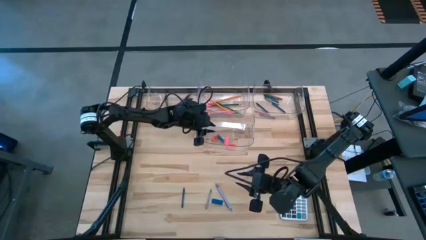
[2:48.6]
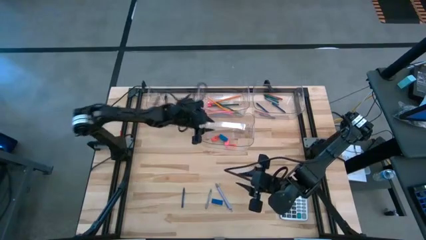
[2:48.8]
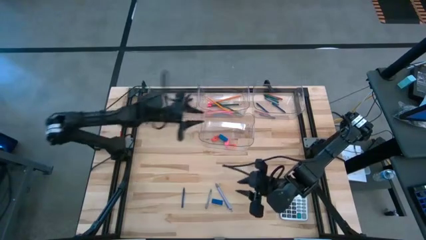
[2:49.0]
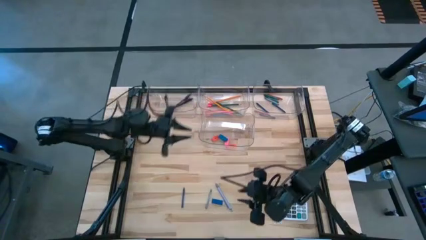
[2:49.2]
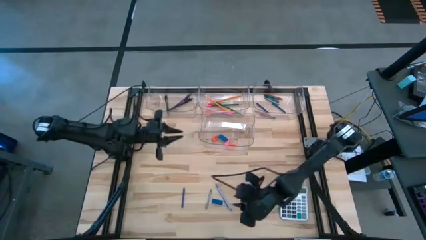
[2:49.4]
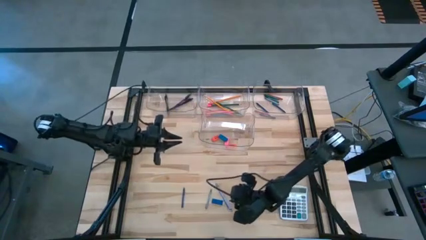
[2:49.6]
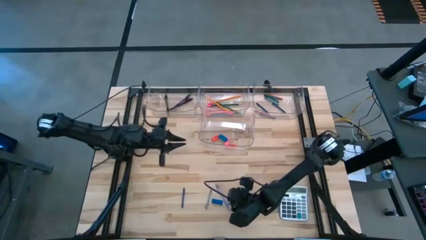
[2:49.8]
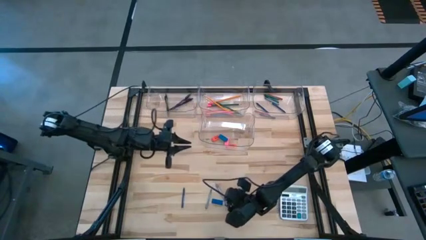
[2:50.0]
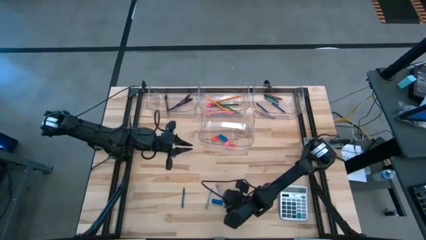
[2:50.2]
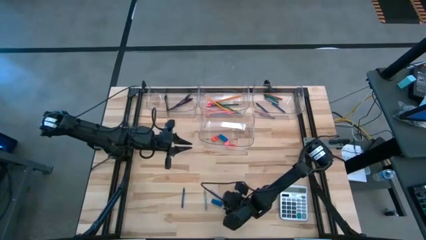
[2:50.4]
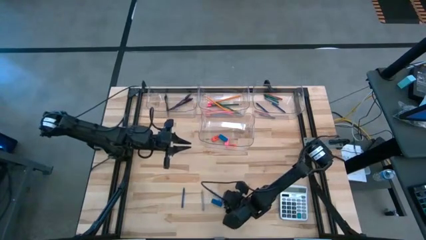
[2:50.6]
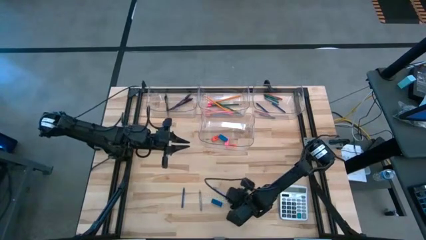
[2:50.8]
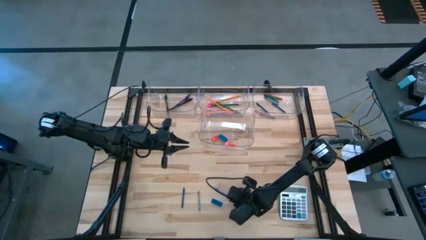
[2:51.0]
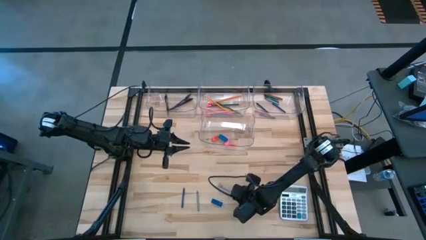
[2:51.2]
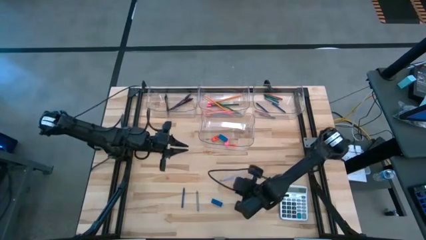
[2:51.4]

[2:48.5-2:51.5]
Task: Sort crayons/erasers/pens/pencils in bins
Put the gray pen into the top left transparent bin

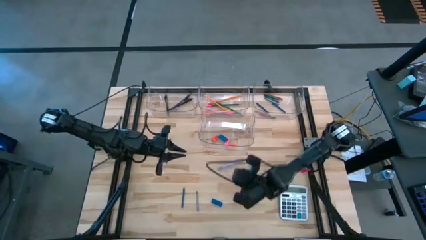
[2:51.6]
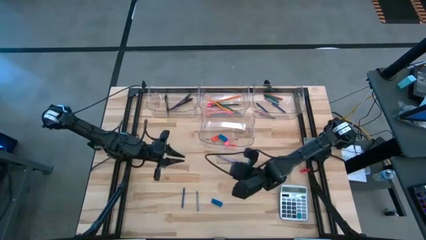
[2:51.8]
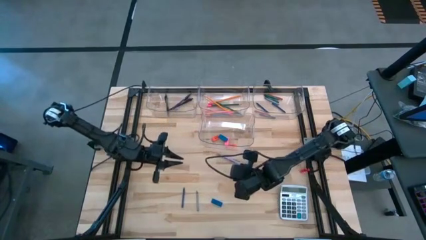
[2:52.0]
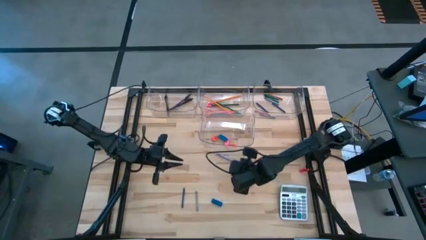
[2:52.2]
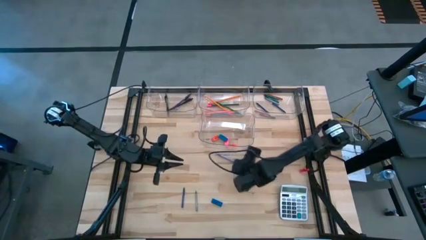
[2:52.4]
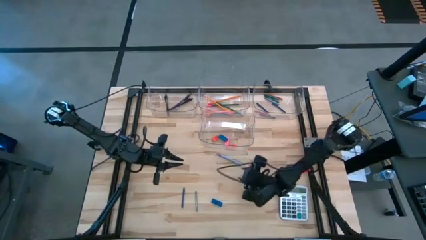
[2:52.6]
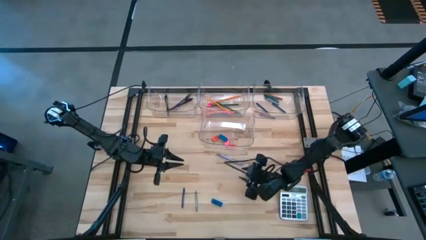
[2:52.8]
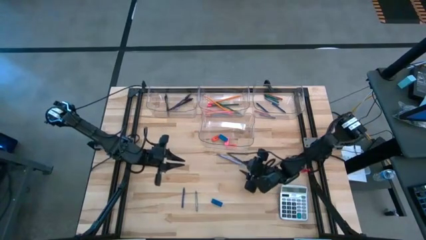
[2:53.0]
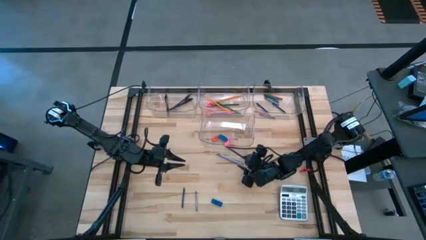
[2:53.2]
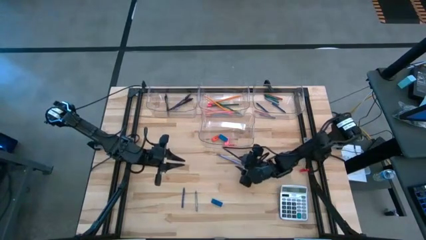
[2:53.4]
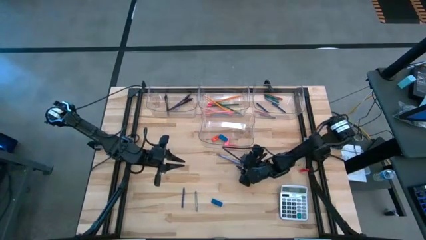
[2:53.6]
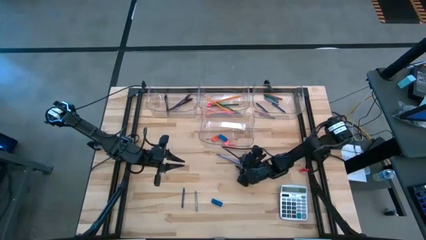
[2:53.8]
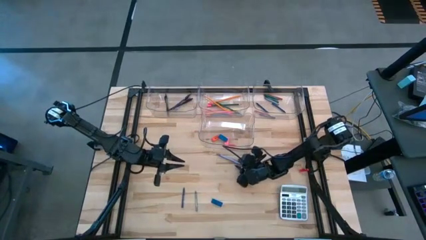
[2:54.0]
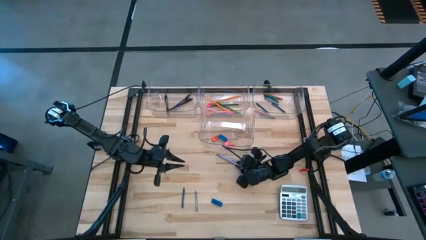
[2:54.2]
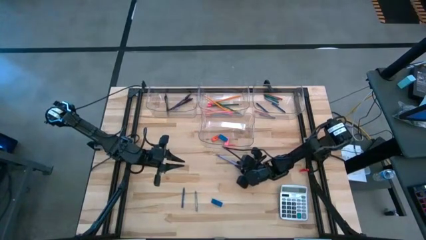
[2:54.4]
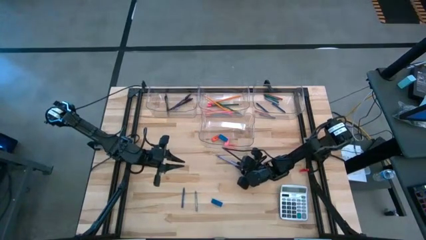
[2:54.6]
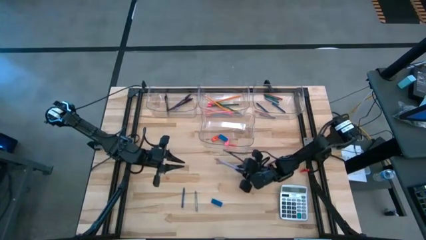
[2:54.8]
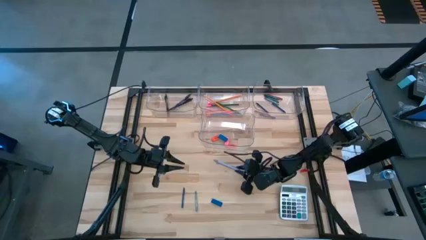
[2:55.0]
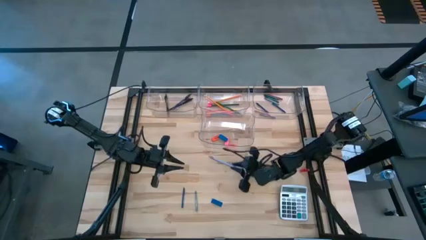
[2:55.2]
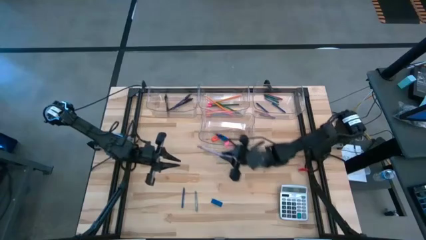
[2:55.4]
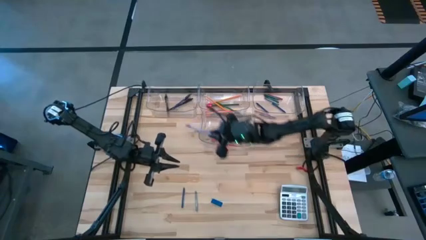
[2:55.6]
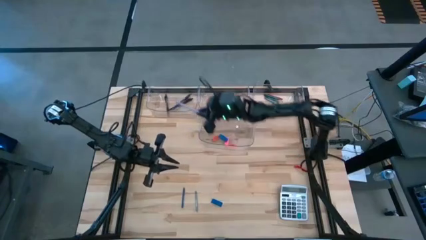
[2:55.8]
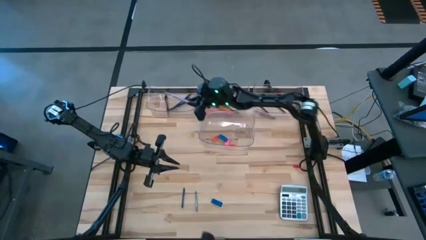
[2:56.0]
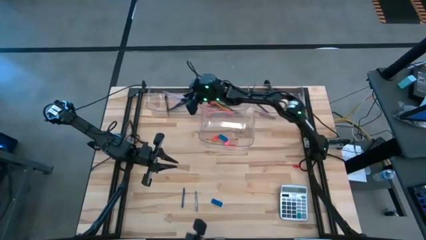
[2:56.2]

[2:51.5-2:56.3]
Put the gray pen into the top left transparent bin

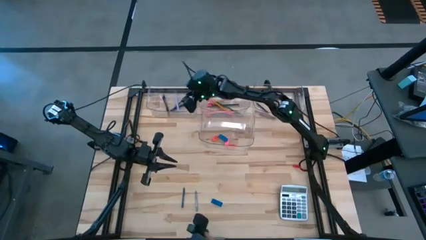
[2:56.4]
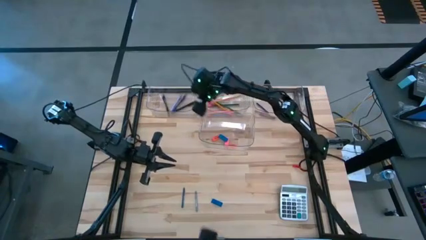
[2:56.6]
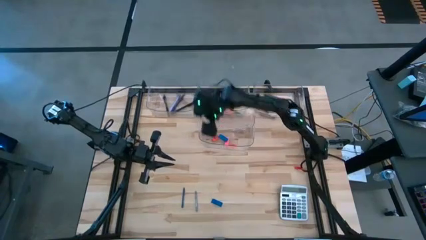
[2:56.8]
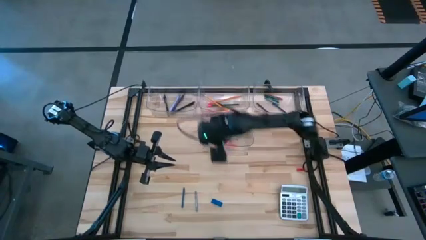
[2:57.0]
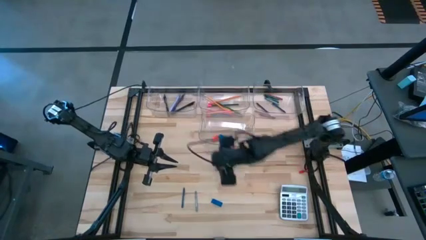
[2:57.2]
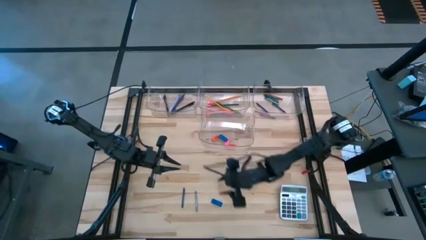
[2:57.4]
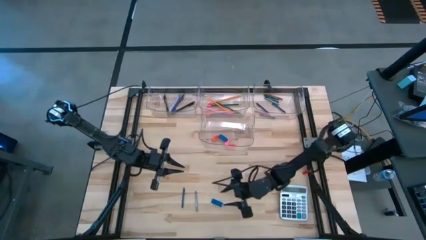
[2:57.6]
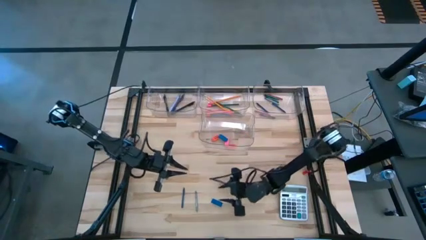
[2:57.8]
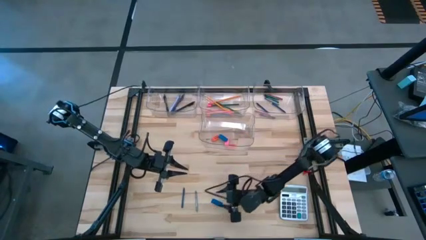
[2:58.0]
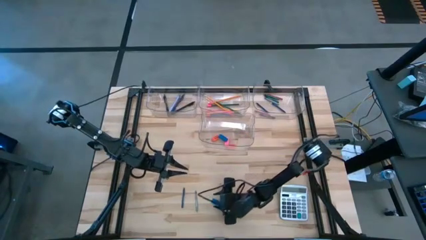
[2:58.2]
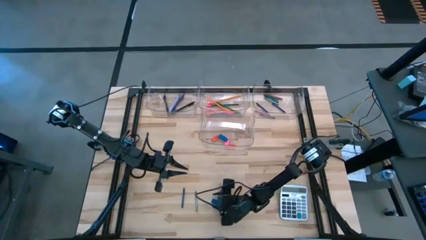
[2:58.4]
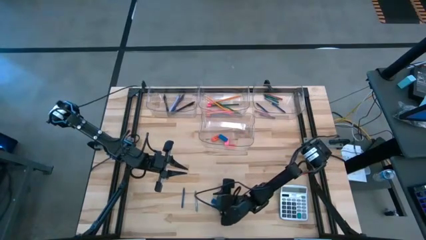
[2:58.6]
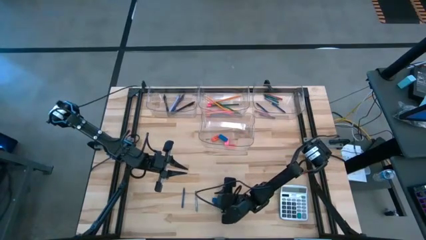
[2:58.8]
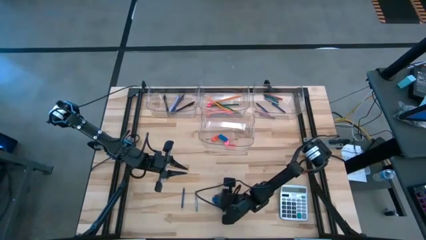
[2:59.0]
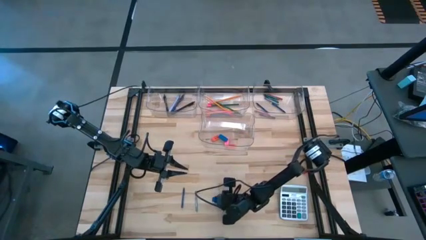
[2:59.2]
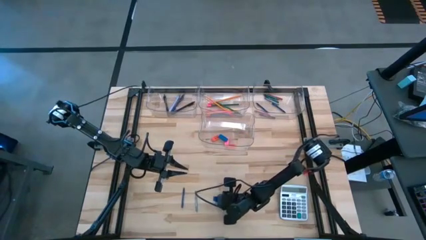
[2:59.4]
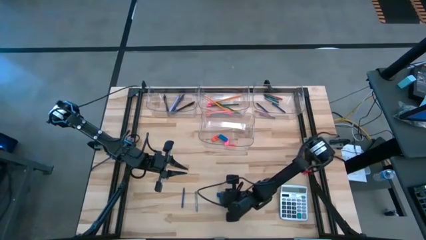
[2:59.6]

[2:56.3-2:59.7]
Put the blue eraser into the bottom transparent bin

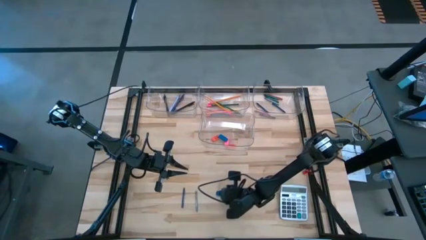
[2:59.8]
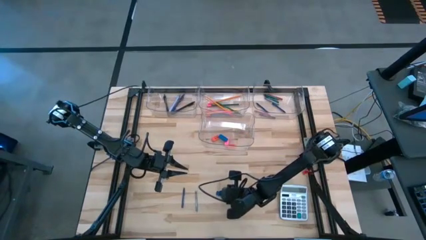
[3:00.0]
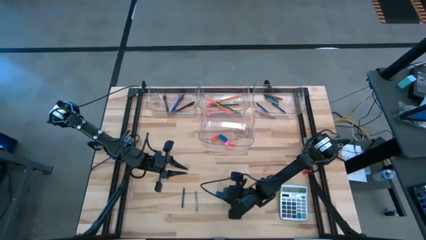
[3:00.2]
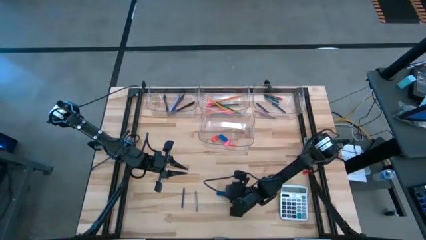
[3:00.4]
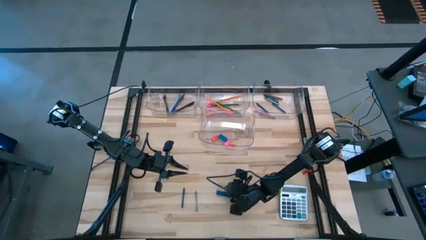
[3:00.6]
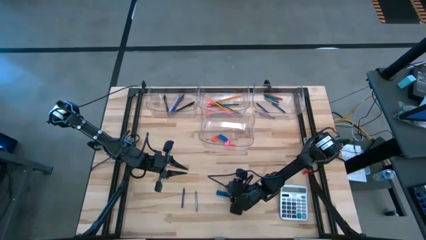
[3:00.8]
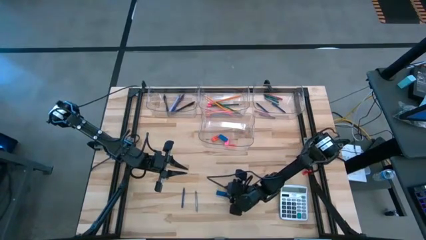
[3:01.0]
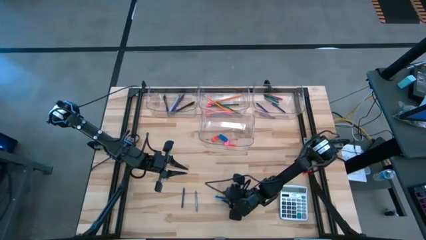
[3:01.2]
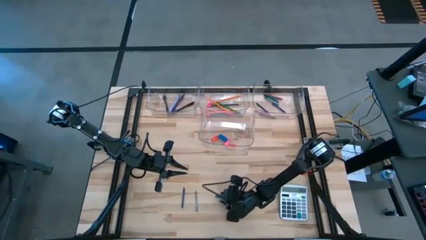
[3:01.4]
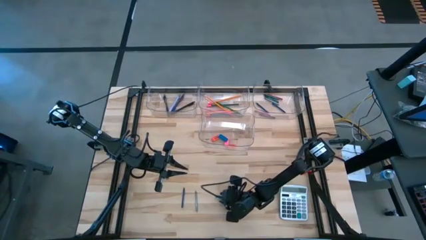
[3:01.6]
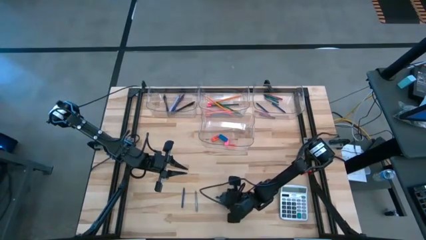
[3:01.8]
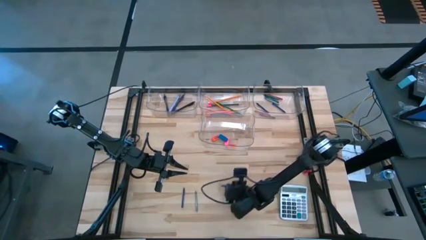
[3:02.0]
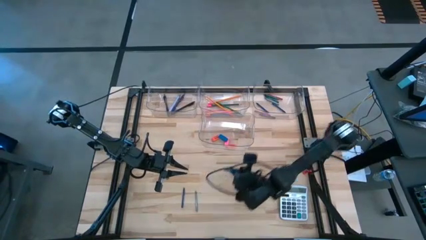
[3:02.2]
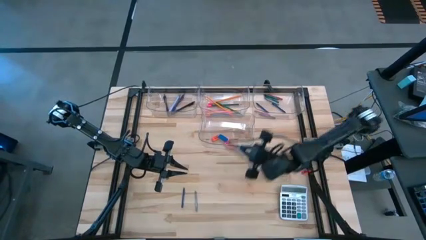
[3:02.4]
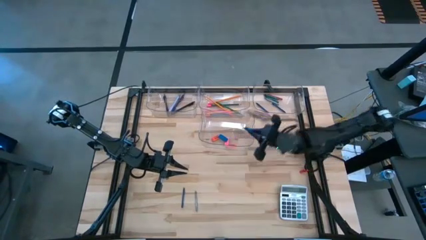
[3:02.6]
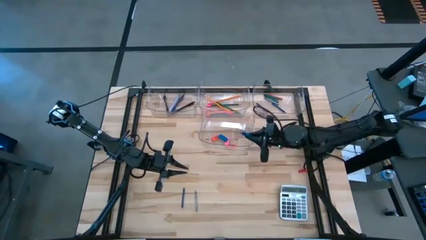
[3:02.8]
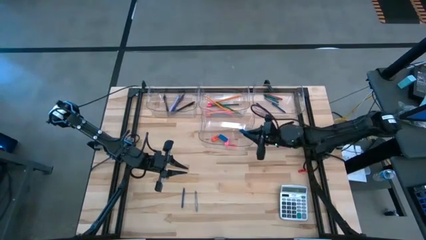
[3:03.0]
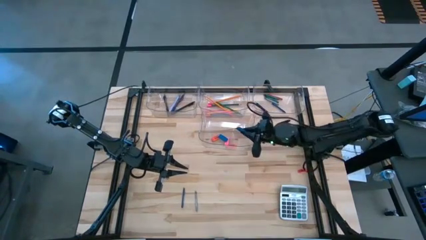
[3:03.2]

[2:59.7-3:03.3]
Put the blue eraser into the bottom transparent bin

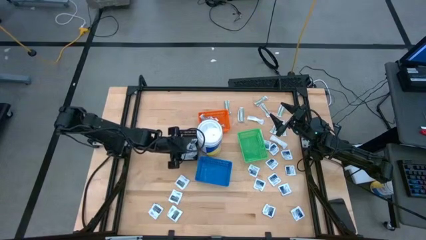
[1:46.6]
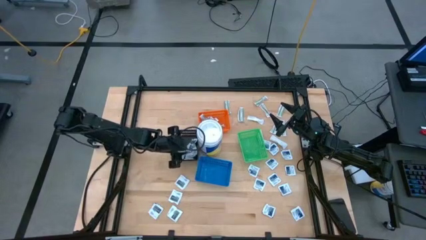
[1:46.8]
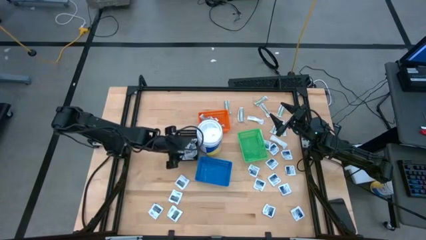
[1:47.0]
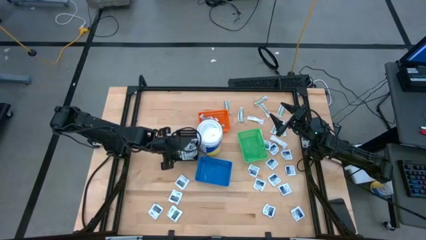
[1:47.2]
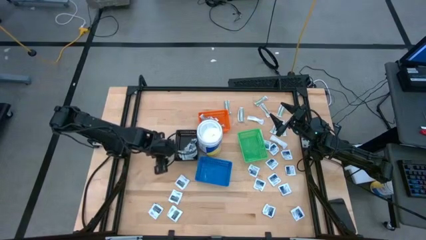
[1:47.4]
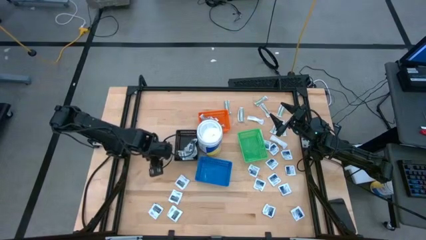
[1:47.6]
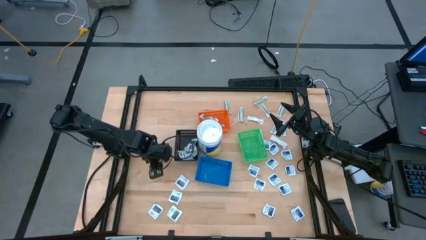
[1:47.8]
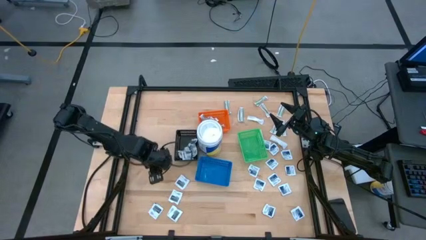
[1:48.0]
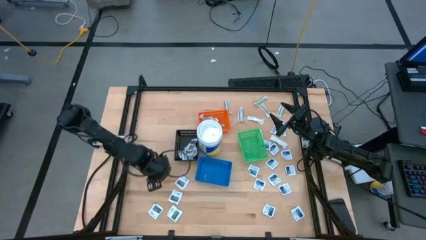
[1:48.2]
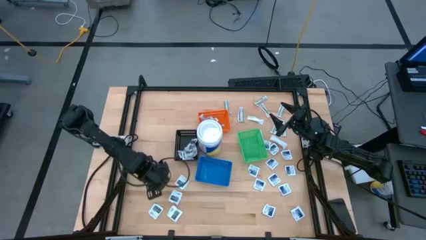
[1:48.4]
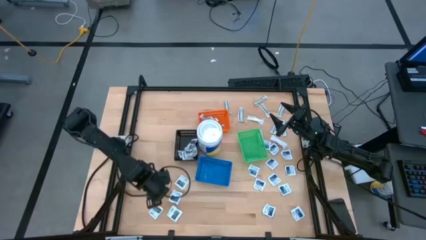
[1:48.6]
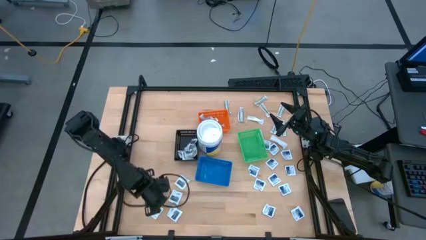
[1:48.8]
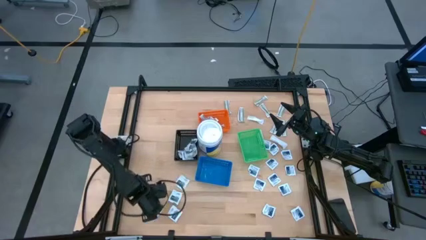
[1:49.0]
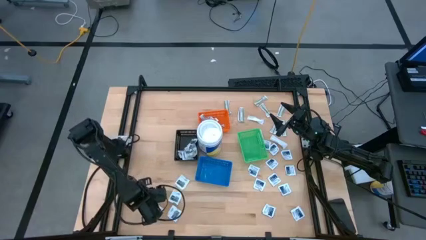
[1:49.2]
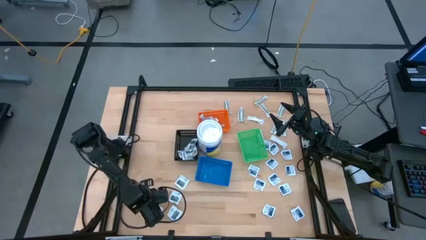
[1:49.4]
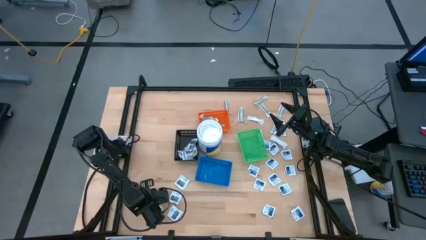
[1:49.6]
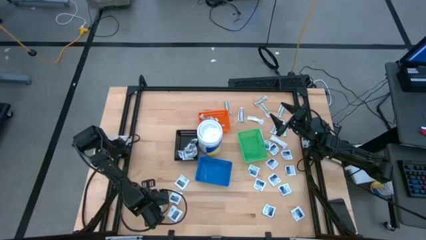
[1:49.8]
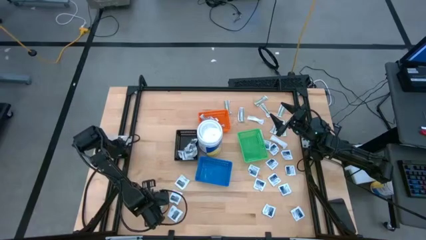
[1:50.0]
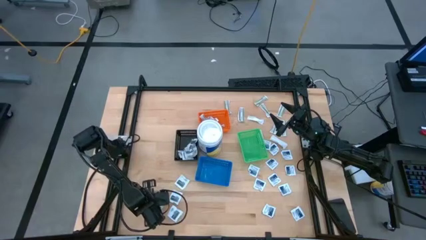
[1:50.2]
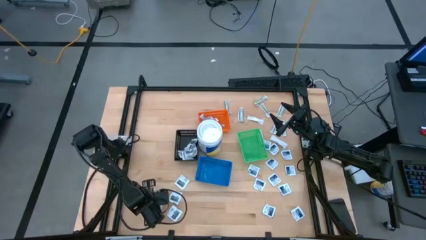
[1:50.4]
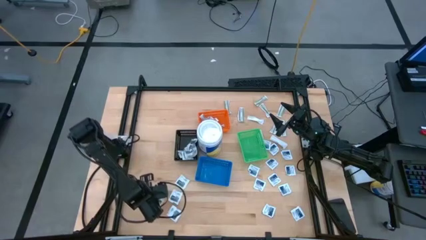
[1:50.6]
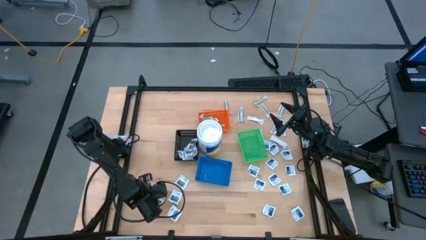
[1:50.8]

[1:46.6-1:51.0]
Task: Pick & Place First Aid Supplies
Put the gray towelette pack into the black bin
